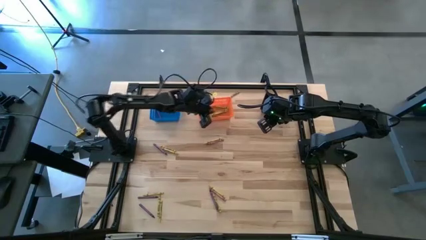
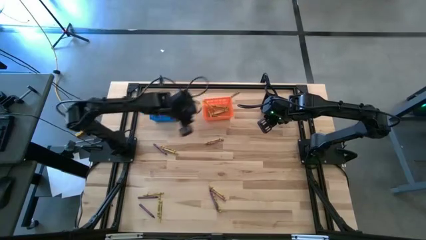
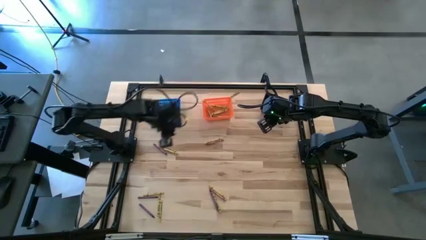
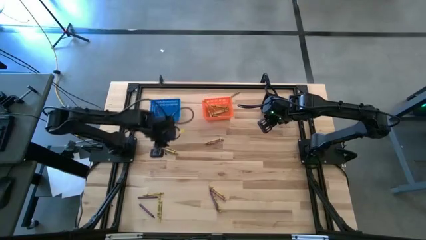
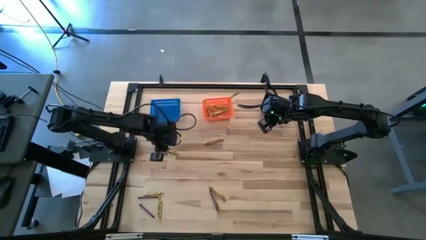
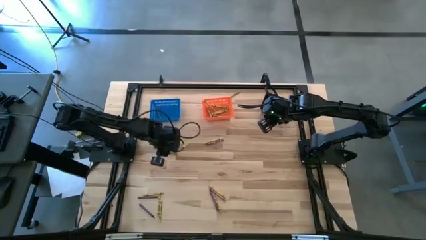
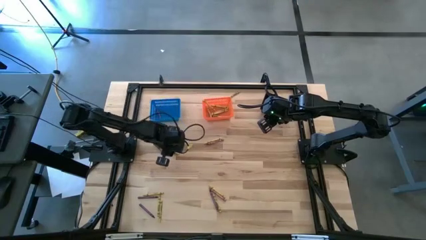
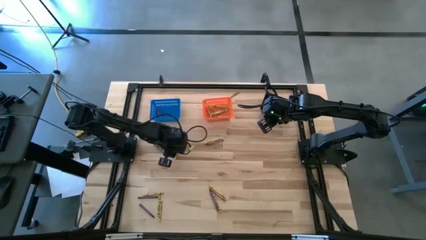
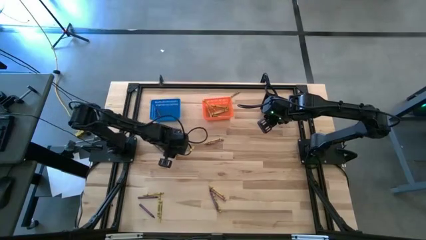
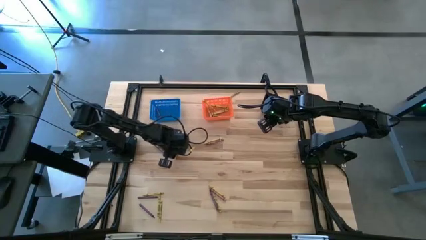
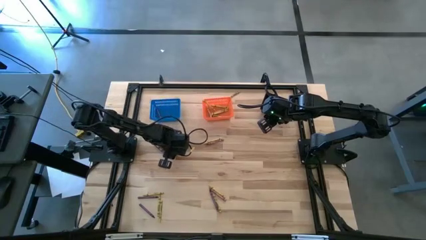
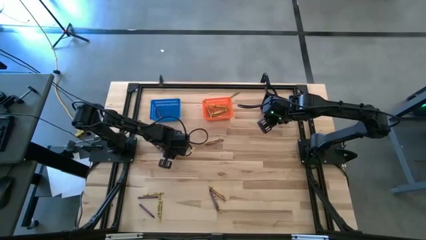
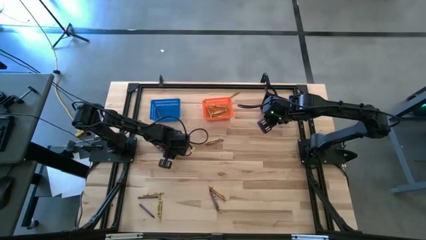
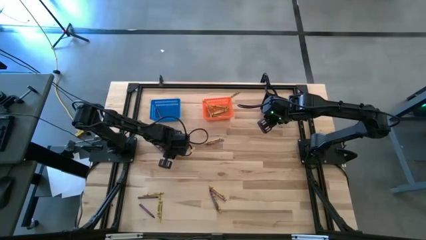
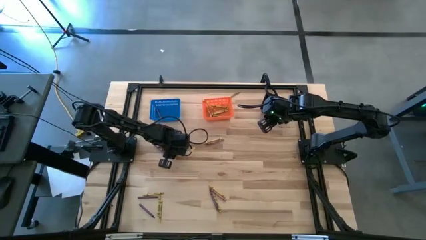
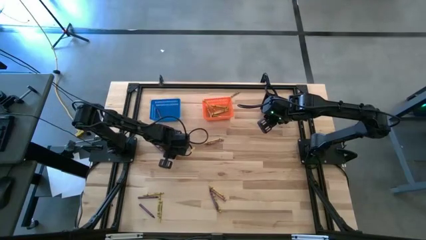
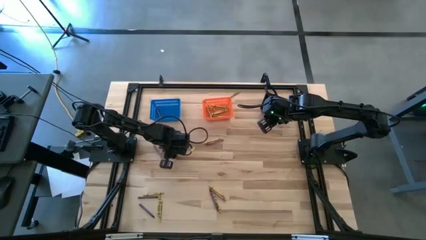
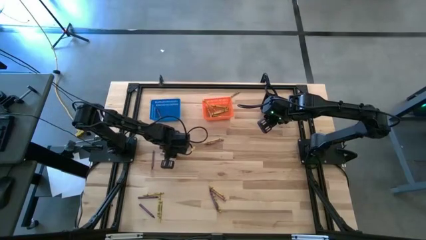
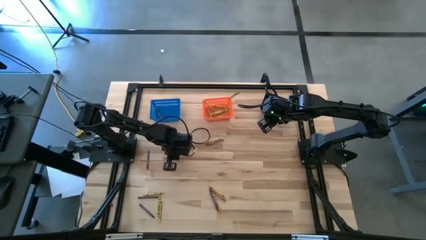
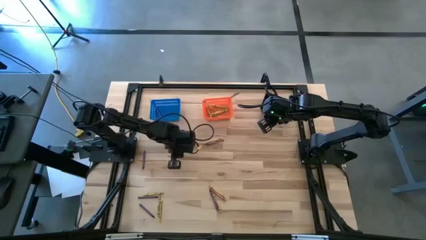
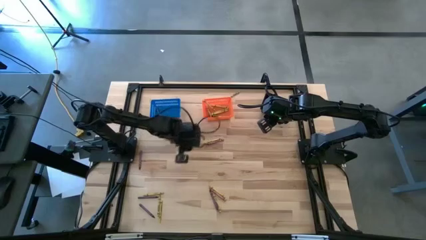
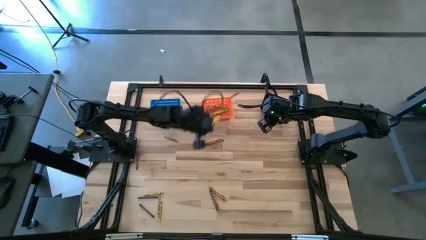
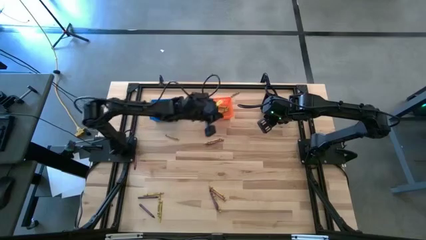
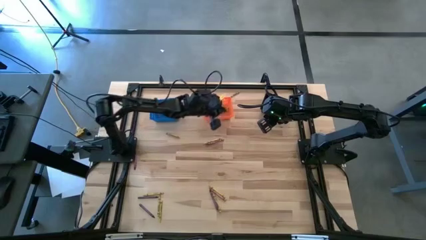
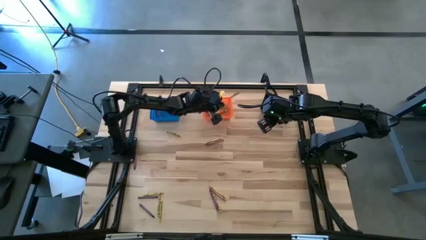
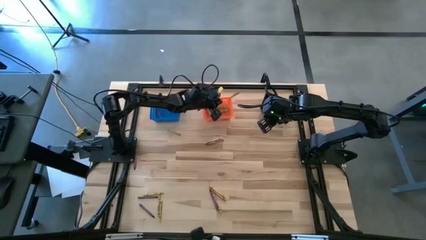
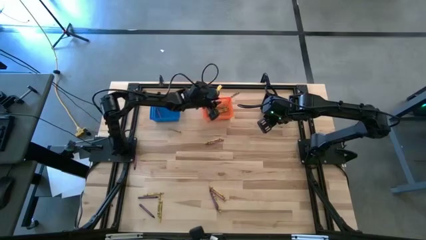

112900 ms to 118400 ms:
Task: Sort crayons
Put the yellow crayon into the orange bin

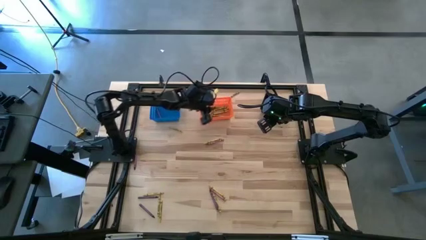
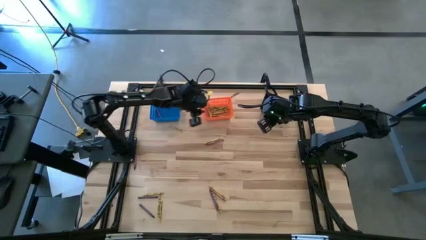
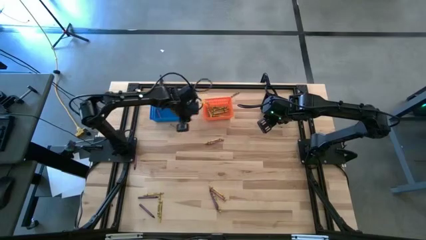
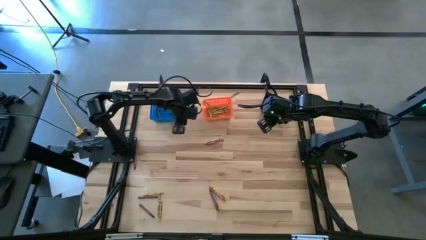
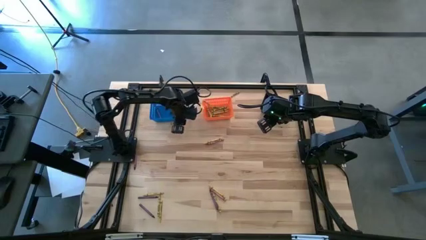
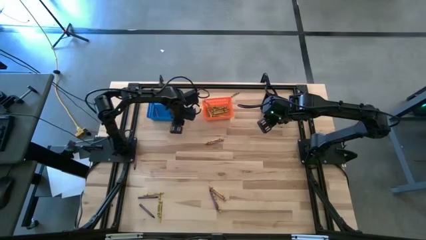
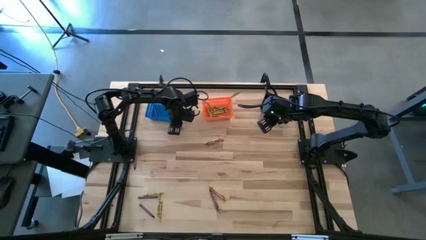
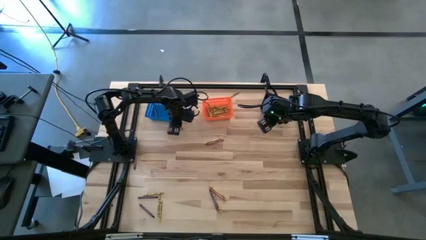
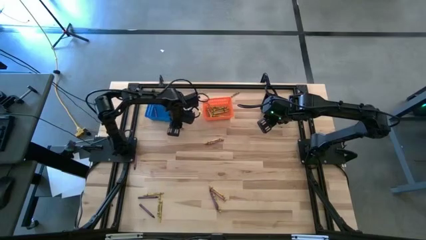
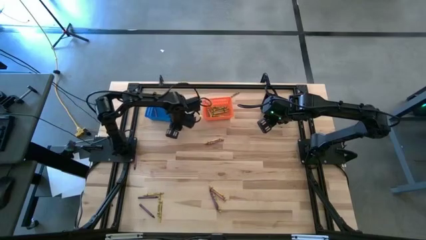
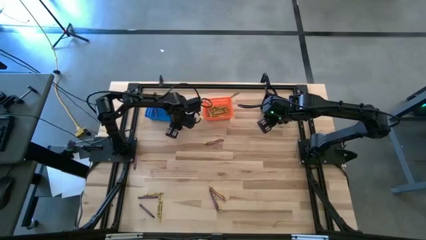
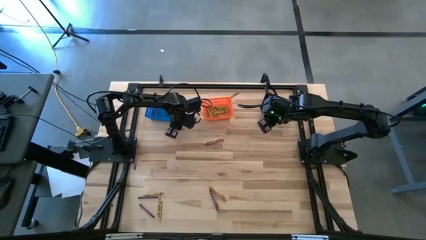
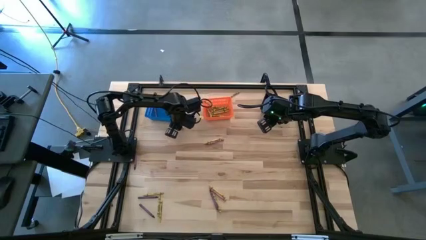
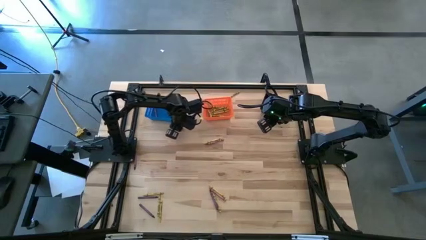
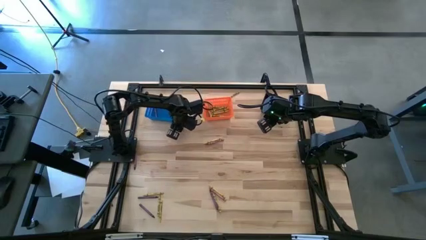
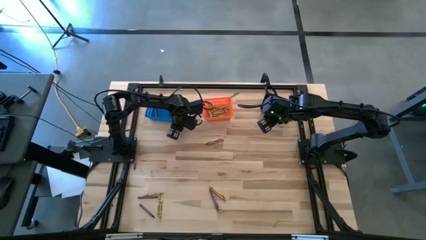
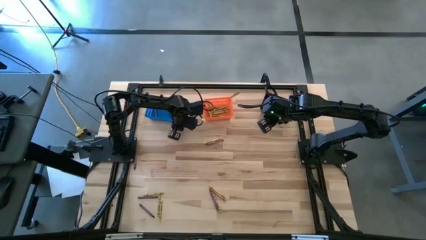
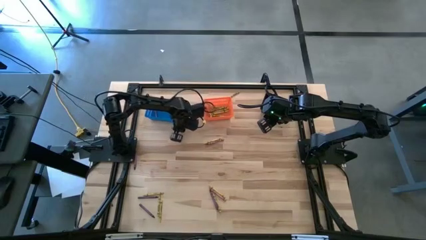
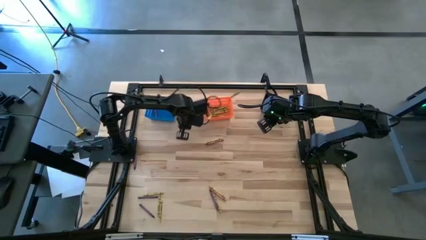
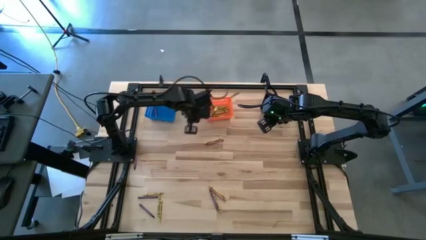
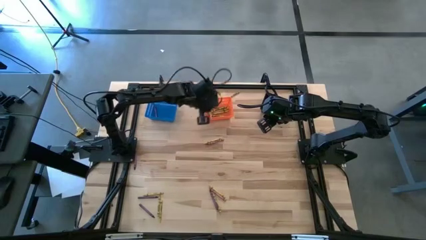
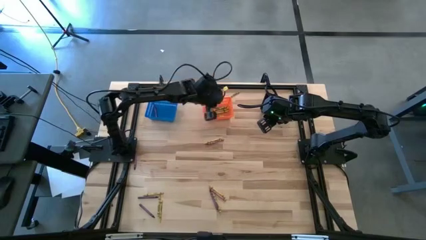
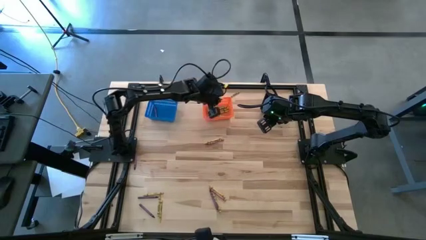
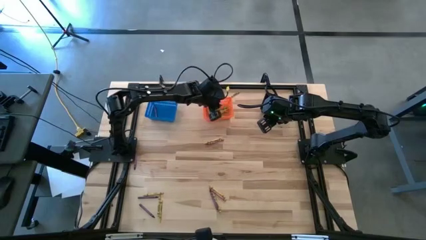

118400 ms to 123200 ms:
Put the yellow crayon into the orange bin

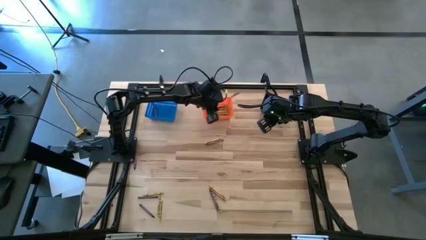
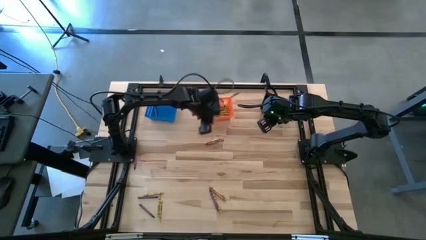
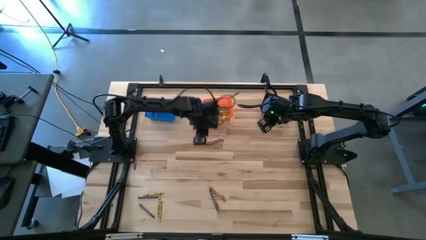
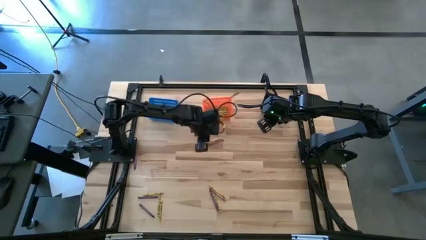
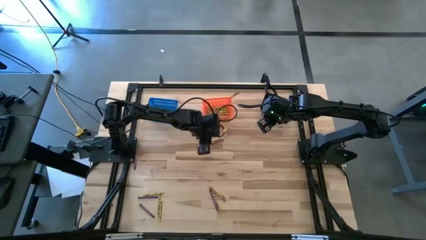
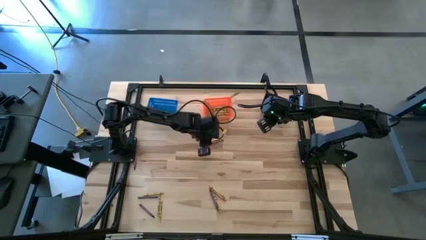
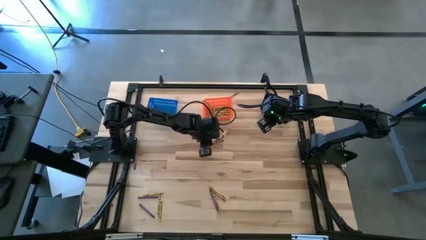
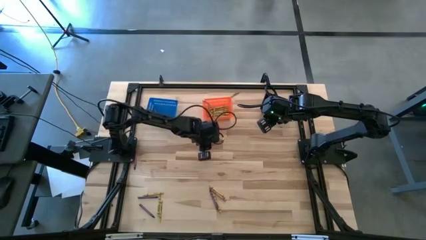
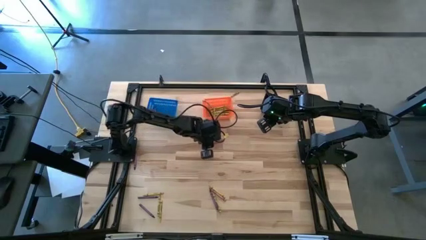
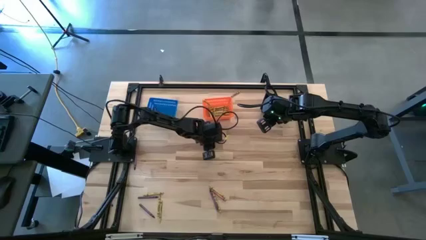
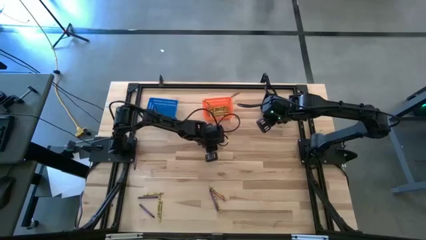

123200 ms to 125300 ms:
Put the top red crayon into the black bin

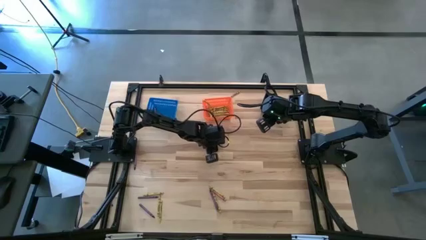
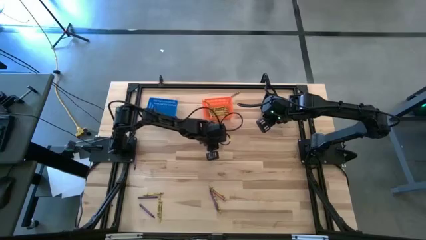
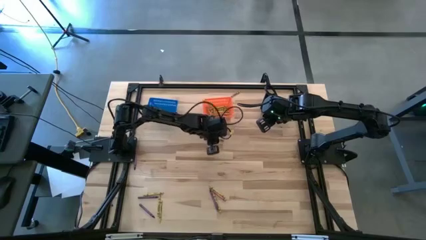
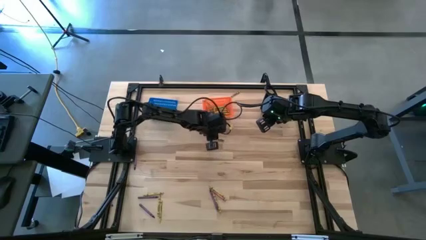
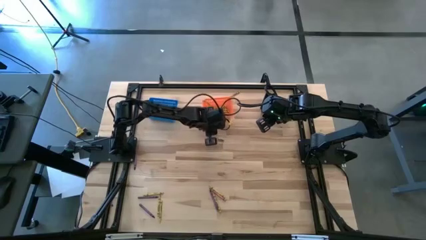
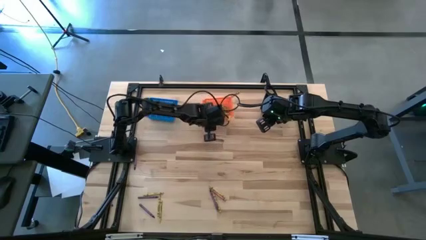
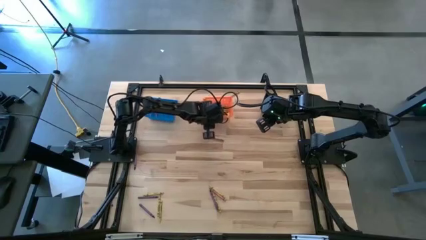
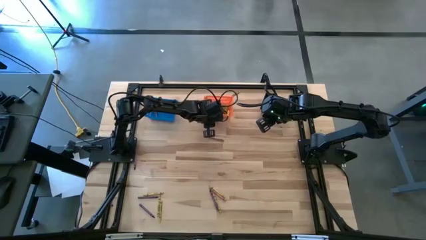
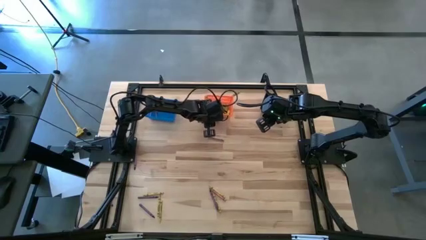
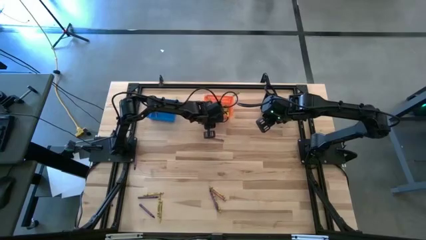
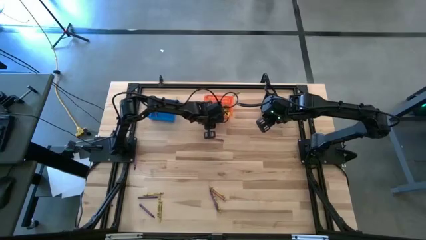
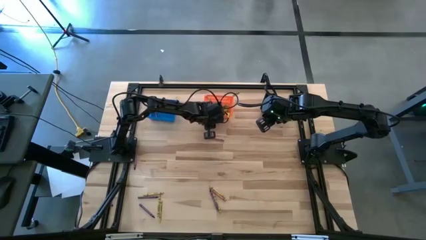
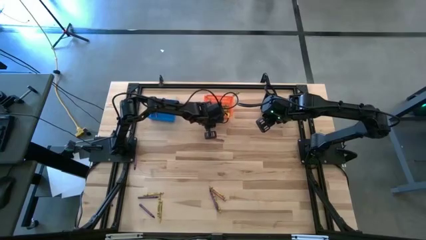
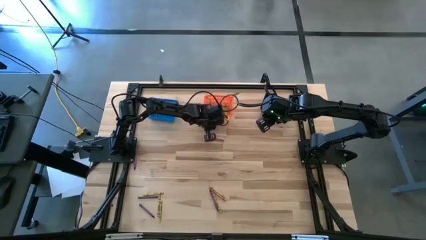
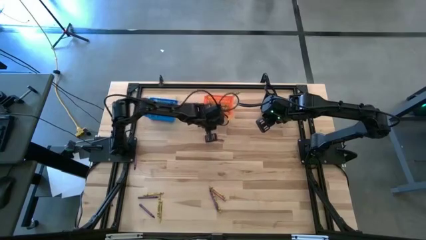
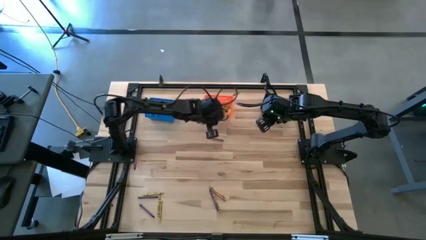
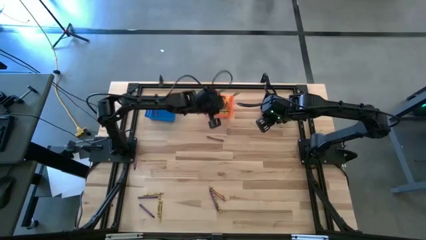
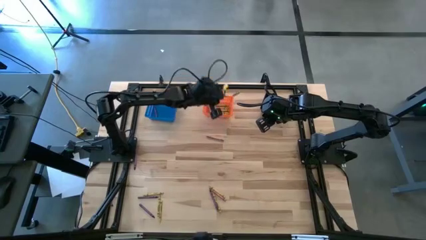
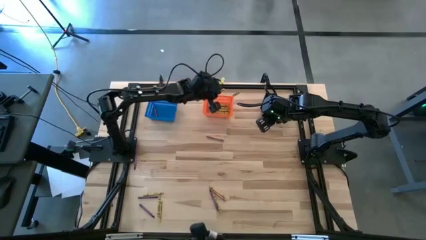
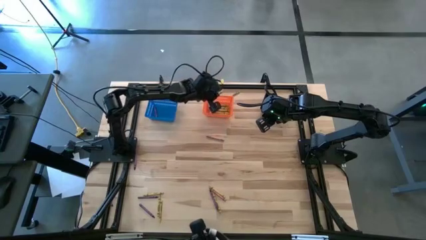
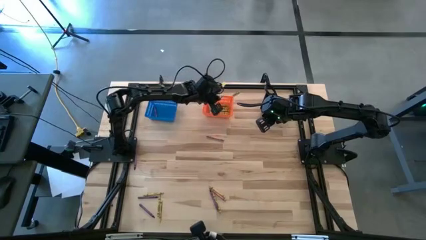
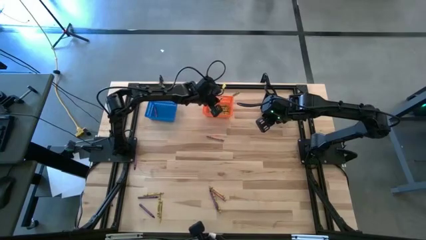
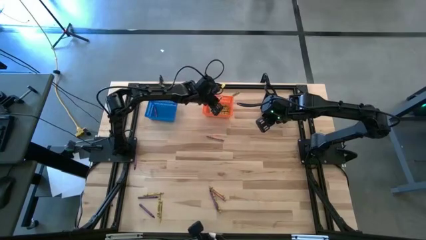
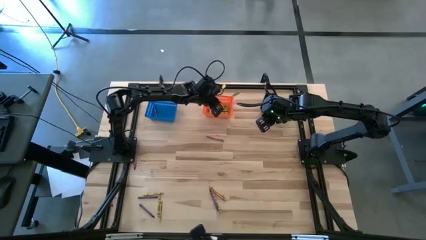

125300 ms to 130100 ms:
Put the yellow crayon into the orange bin
